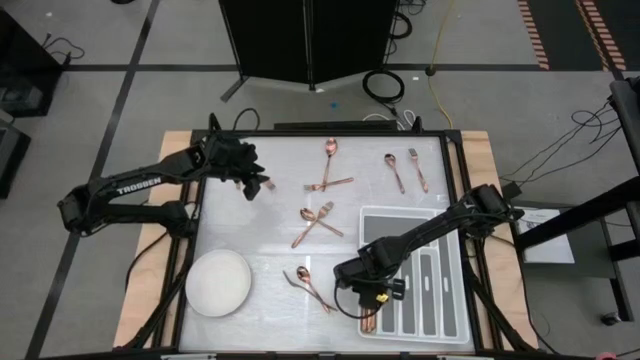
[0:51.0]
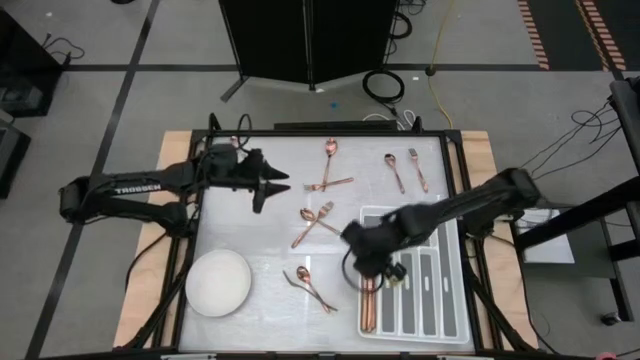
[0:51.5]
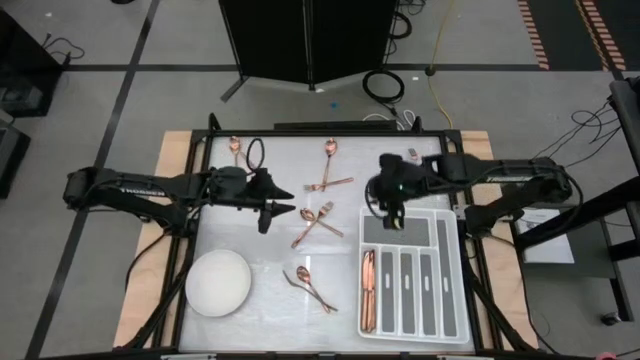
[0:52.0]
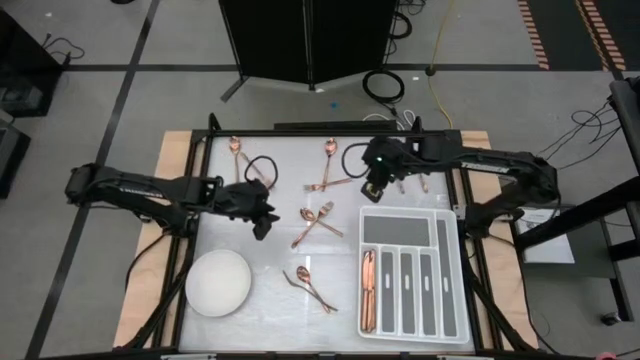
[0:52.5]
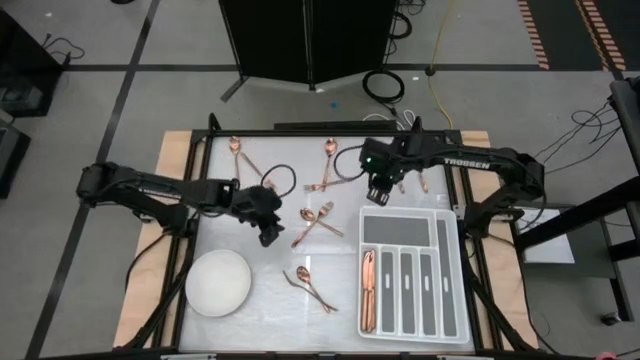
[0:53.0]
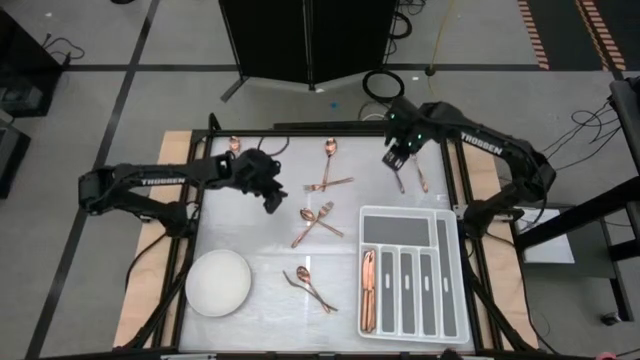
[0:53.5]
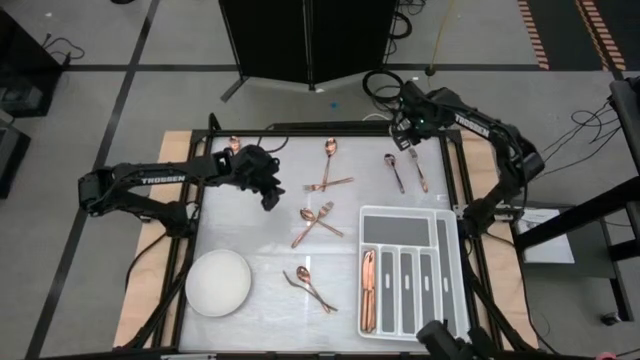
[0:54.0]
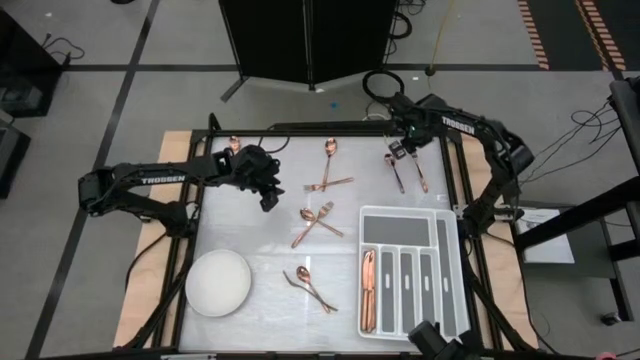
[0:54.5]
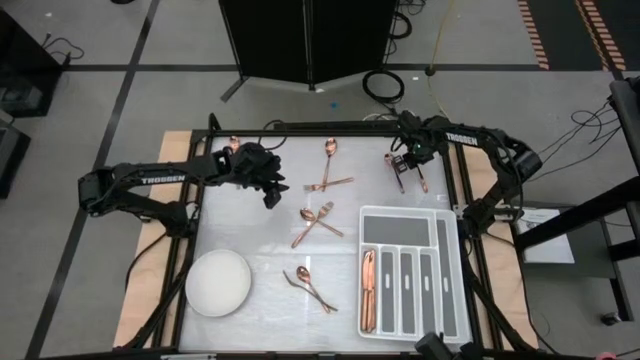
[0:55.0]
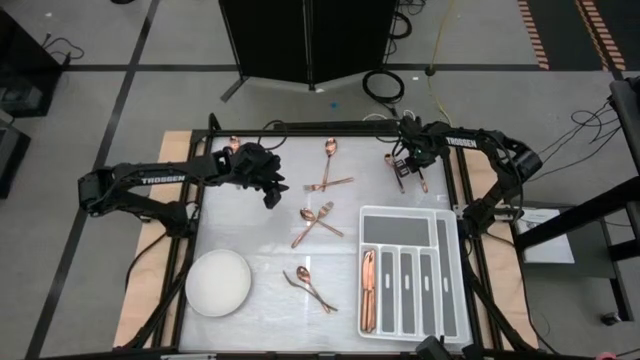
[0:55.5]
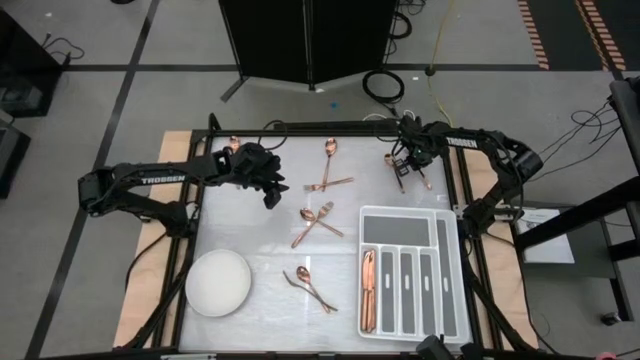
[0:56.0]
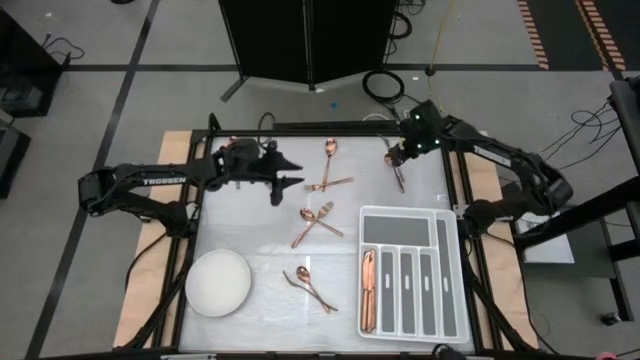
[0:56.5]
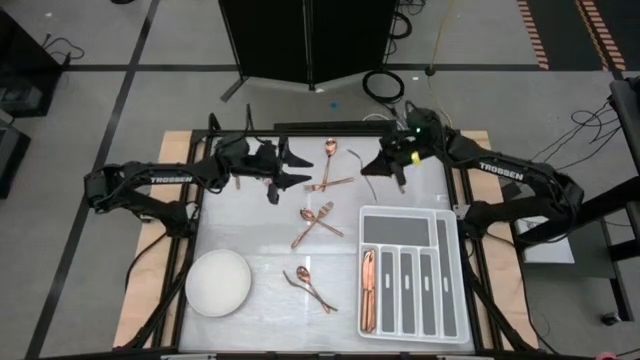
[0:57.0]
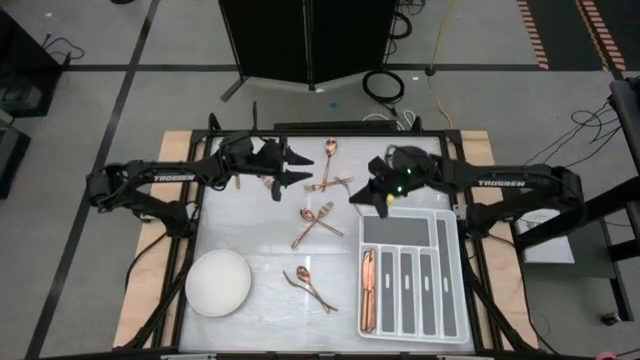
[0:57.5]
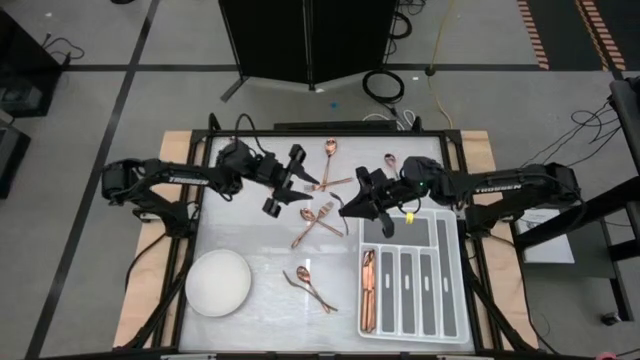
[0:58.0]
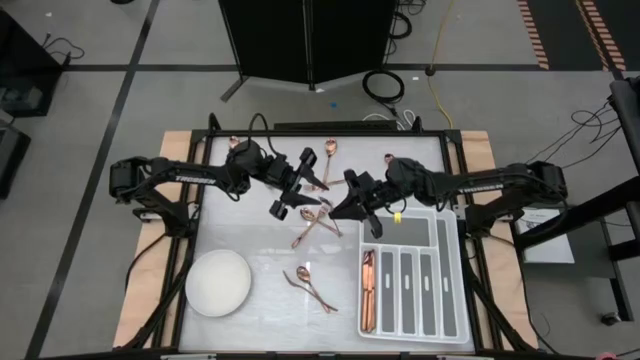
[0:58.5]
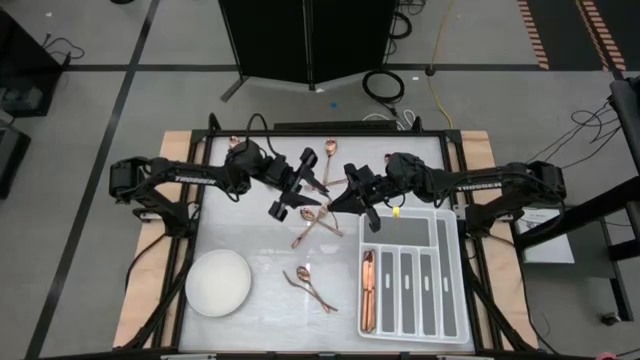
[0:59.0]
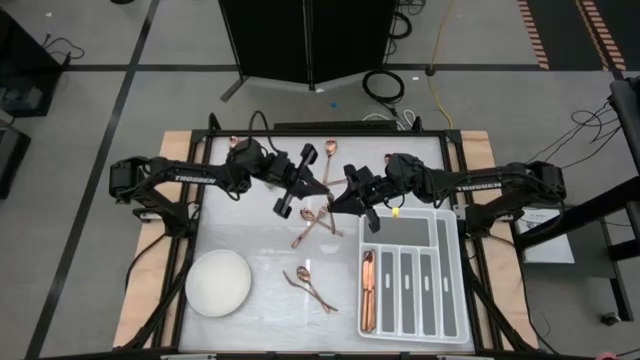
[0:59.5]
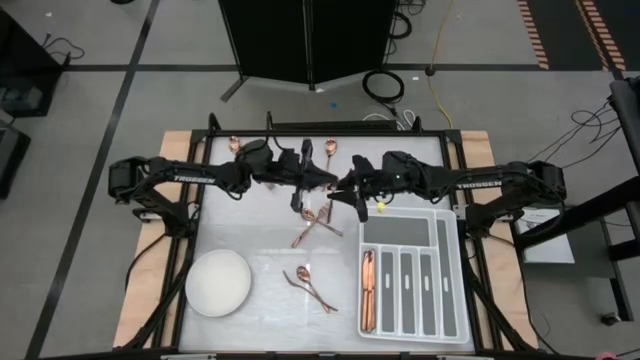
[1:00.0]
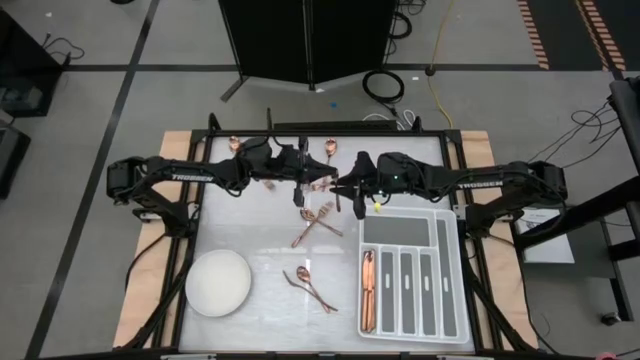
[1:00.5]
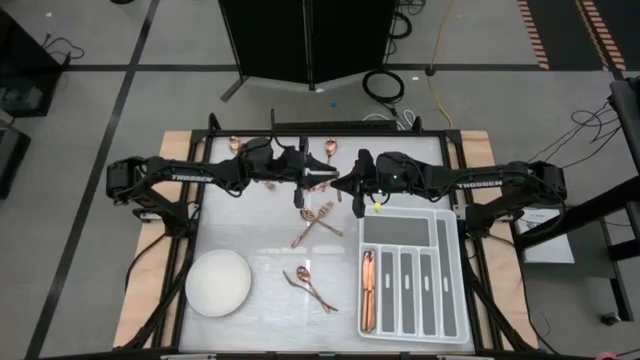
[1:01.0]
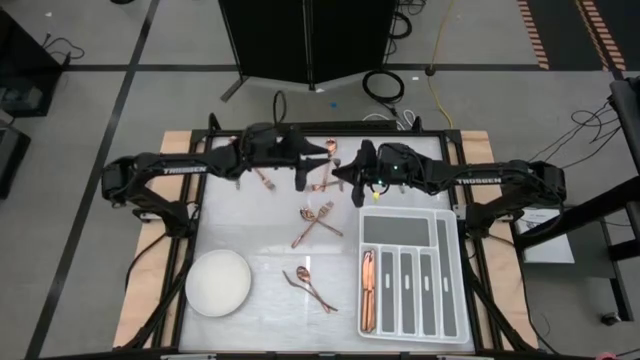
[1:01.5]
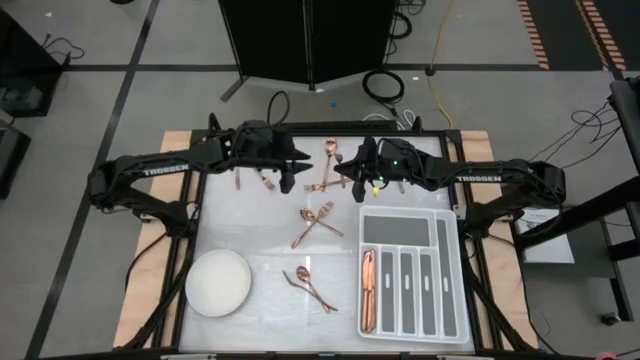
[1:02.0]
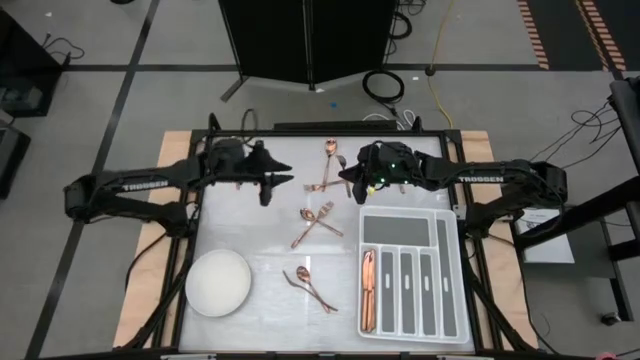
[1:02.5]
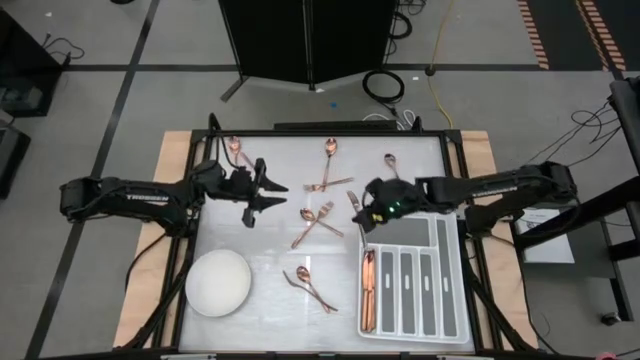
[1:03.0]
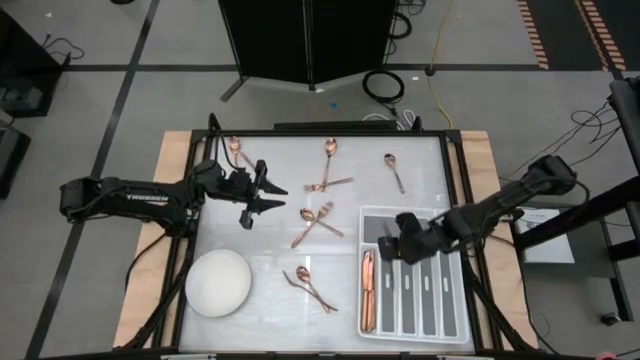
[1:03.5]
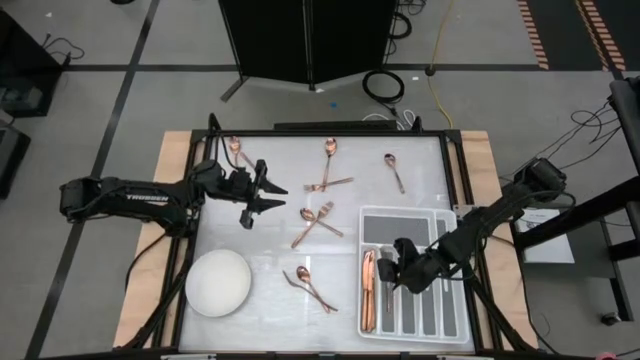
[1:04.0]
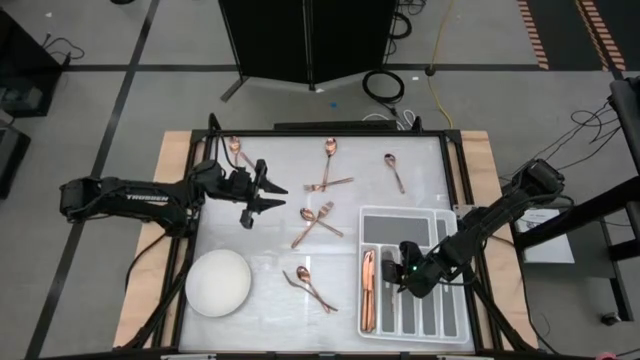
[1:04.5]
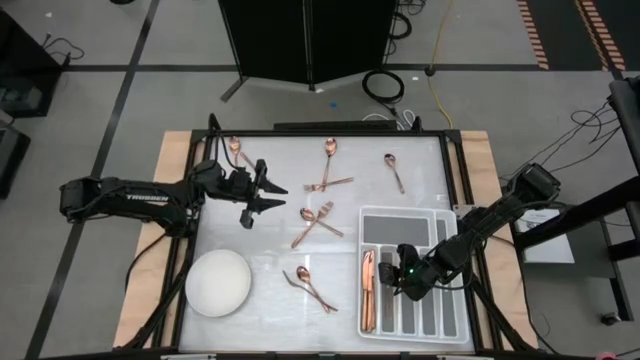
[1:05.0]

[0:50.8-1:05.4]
Task: Sort silverware
Put the brown fork in the white silverware organizer

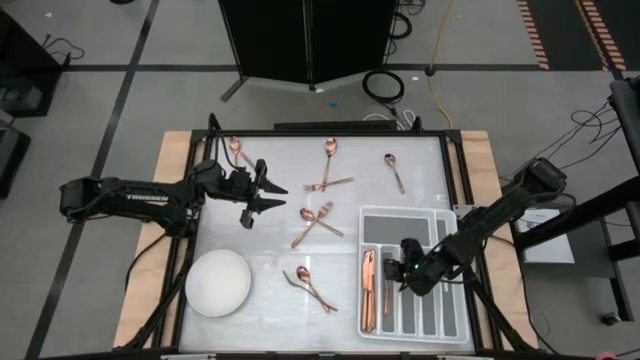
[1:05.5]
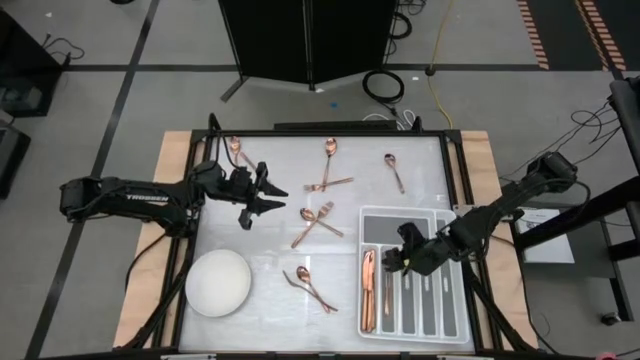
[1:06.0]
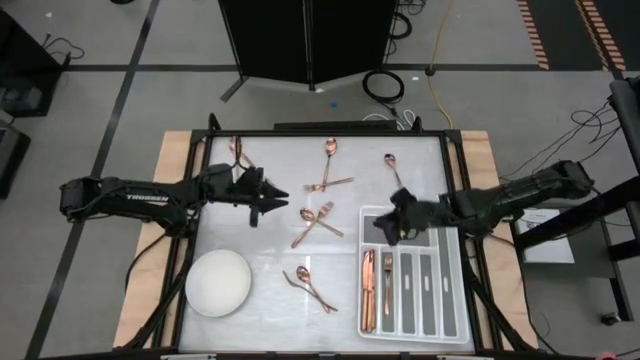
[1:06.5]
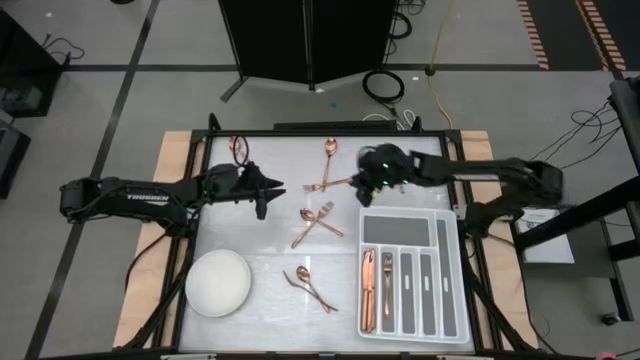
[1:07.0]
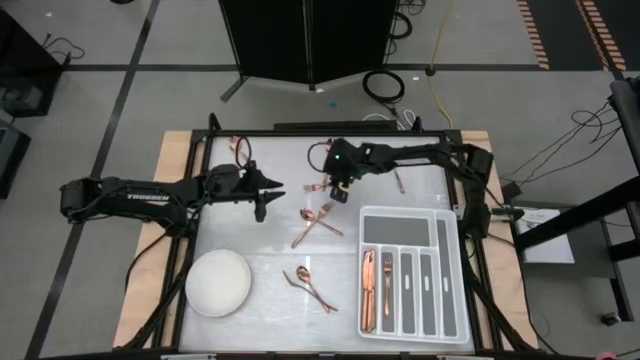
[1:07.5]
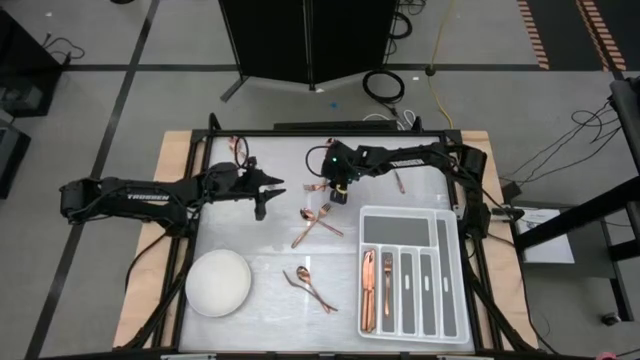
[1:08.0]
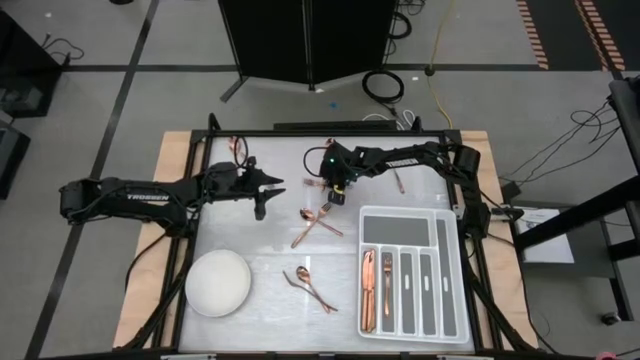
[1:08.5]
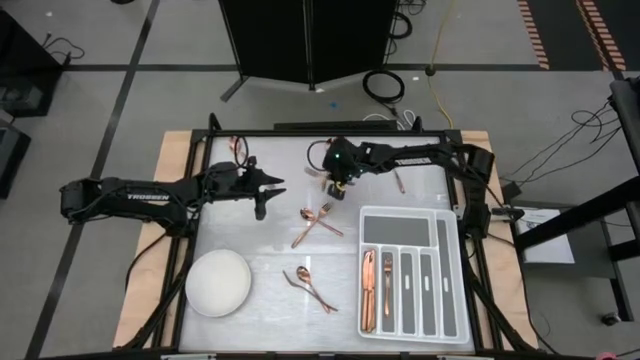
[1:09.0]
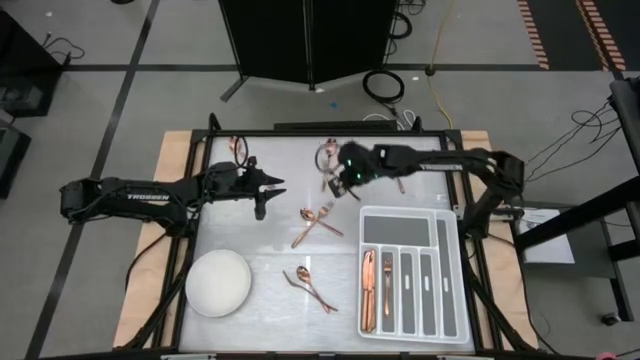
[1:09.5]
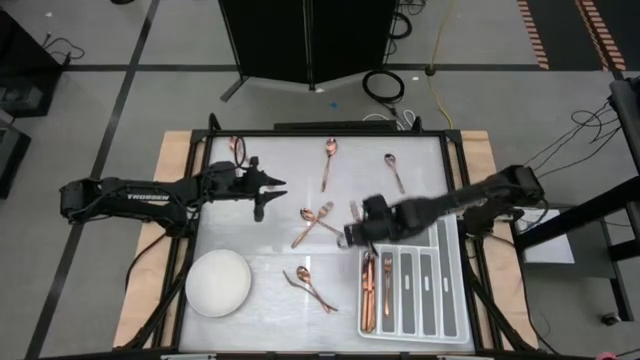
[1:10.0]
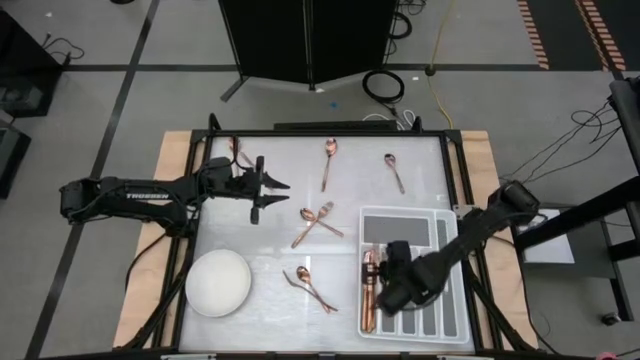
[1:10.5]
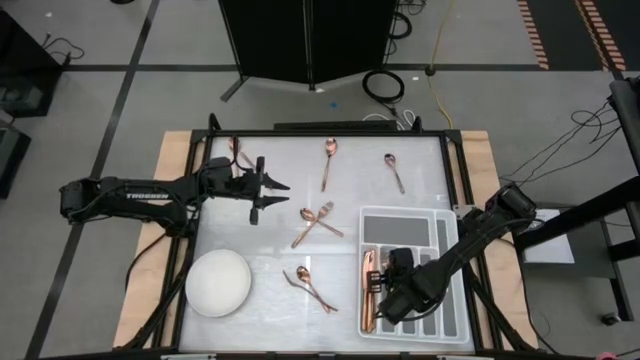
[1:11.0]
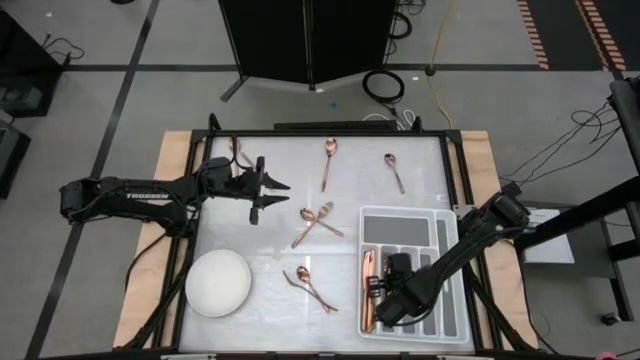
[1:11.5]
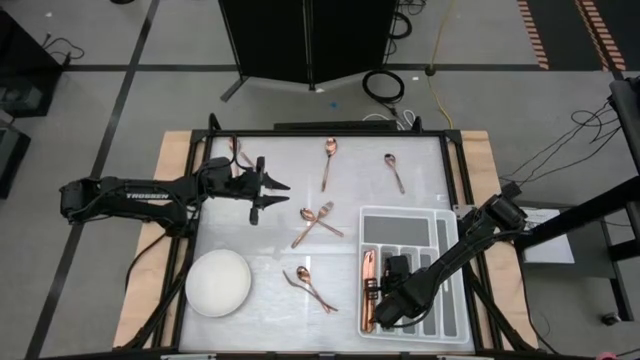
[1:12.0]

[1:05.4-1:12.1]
Put the brown fork in the white silverware organizer

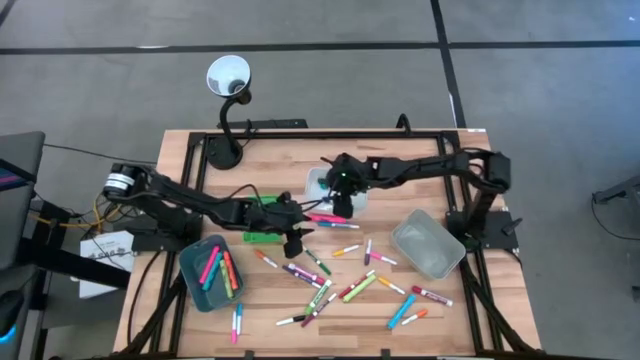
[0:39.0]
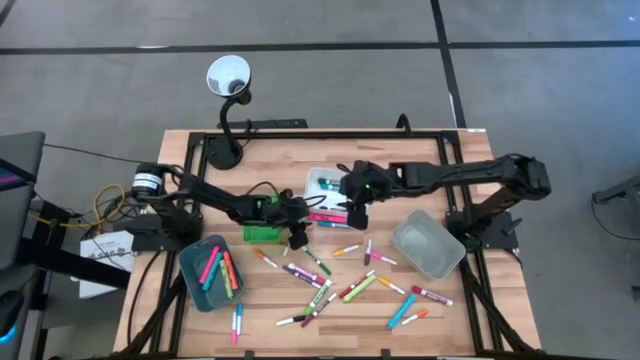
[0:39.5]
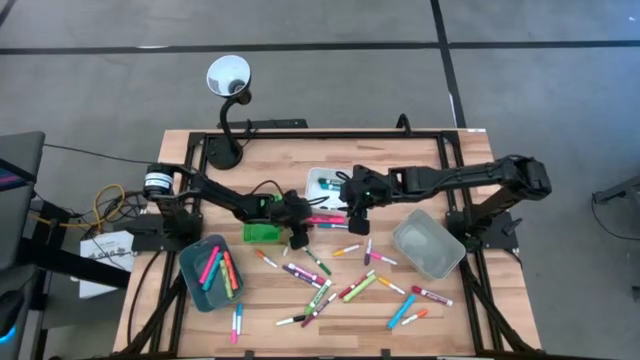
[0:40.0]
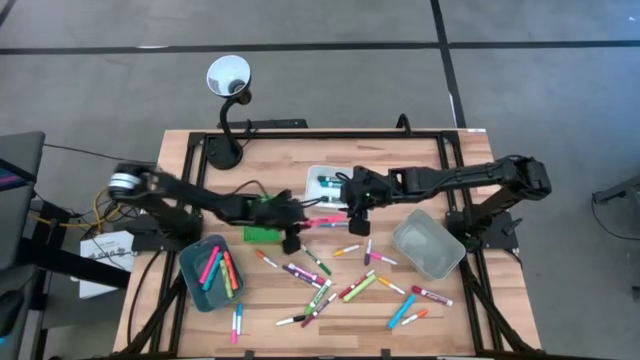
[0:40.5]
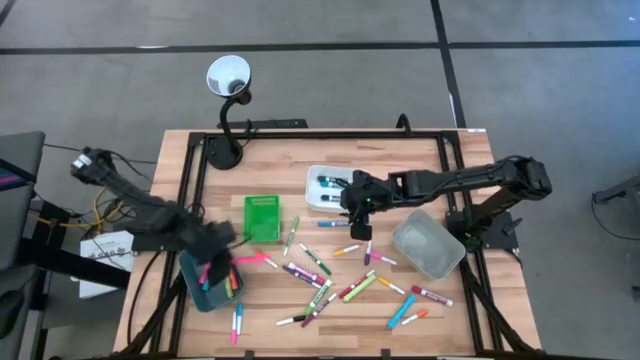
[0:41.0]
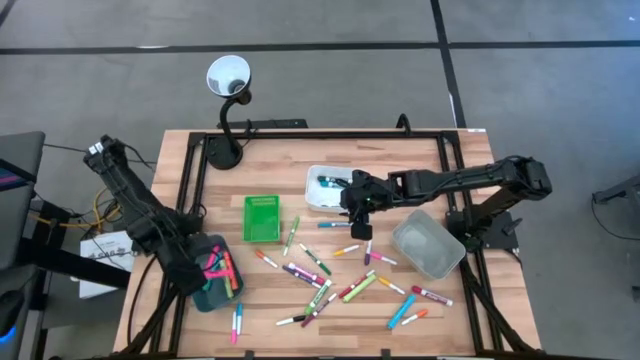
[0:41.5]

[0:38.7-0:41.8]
Task: Pick & Place Markers
Put the big pink highlighter pen into the blue bin
